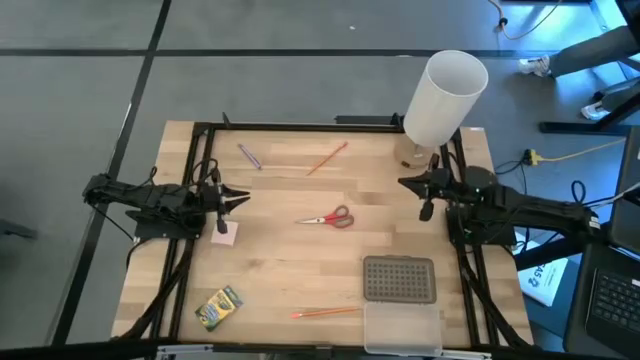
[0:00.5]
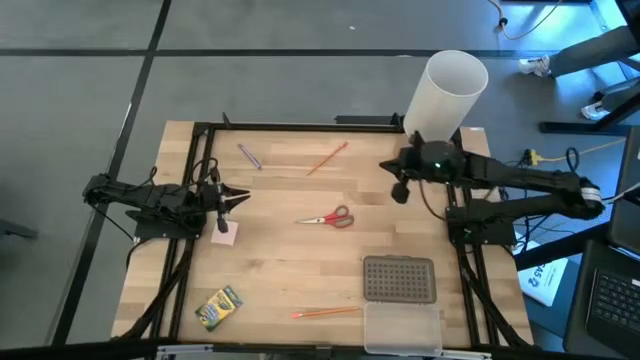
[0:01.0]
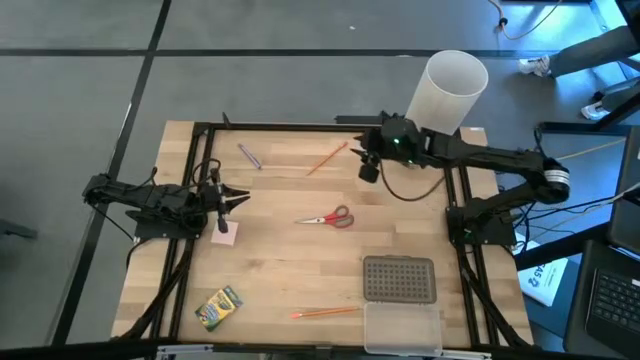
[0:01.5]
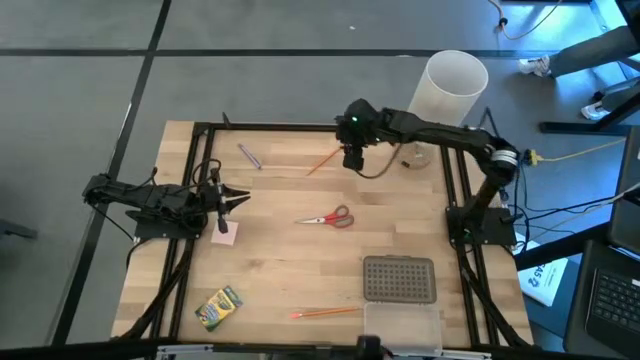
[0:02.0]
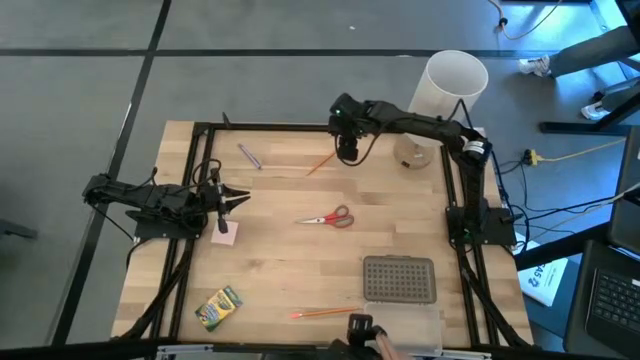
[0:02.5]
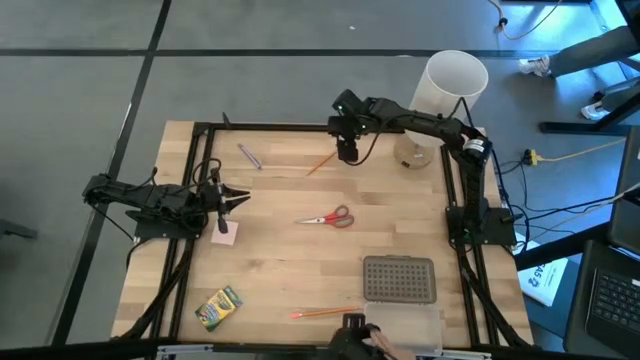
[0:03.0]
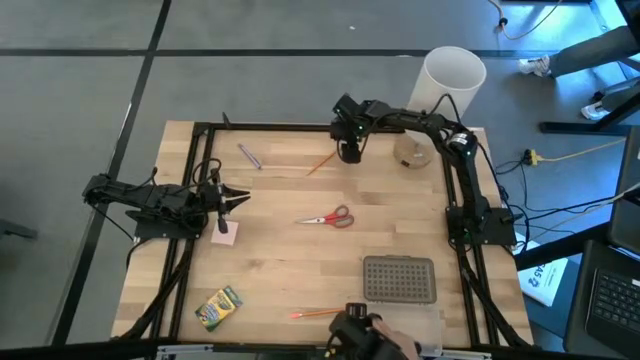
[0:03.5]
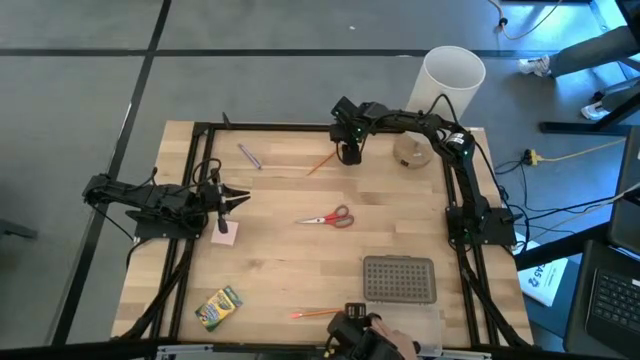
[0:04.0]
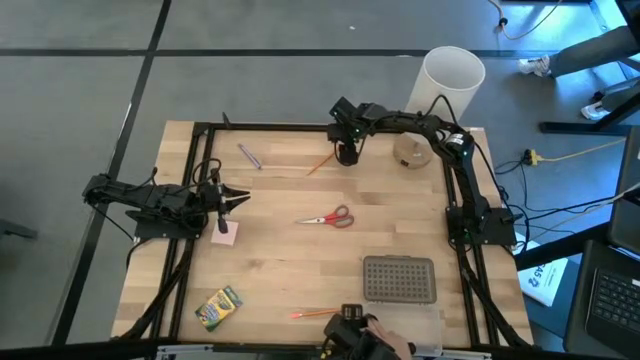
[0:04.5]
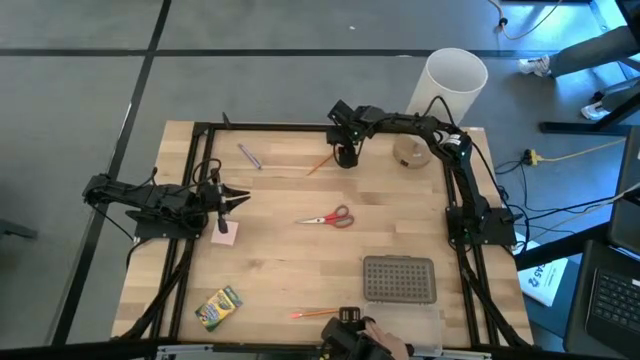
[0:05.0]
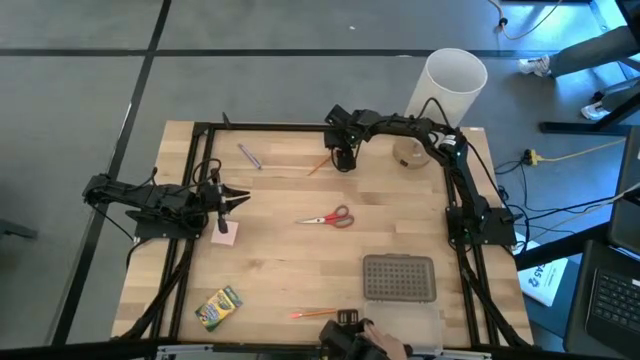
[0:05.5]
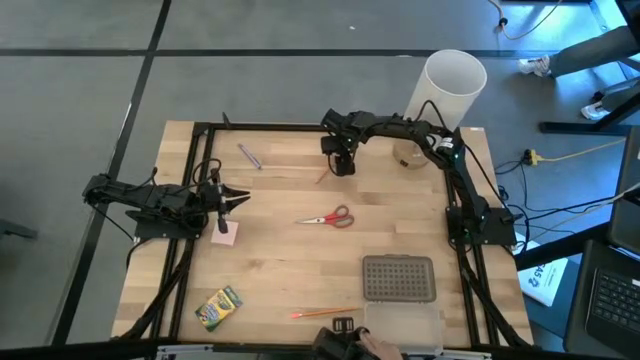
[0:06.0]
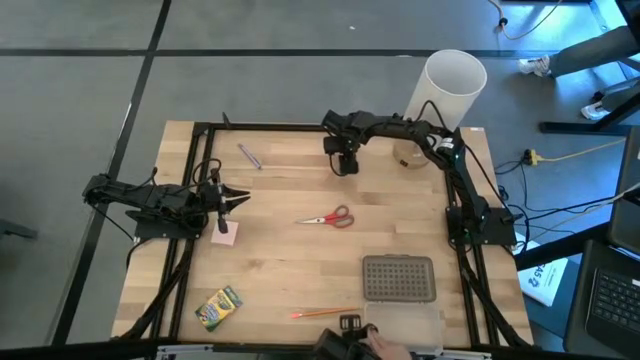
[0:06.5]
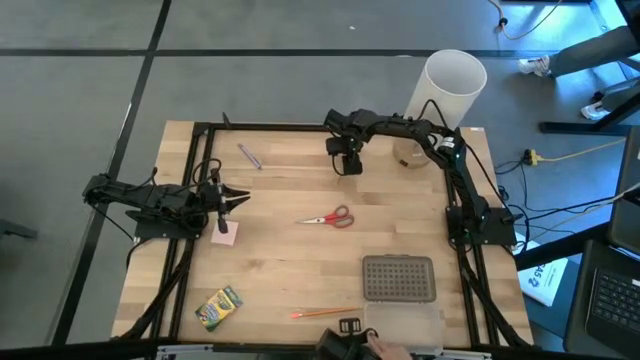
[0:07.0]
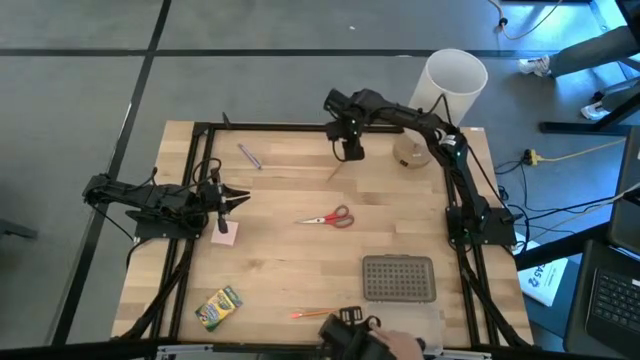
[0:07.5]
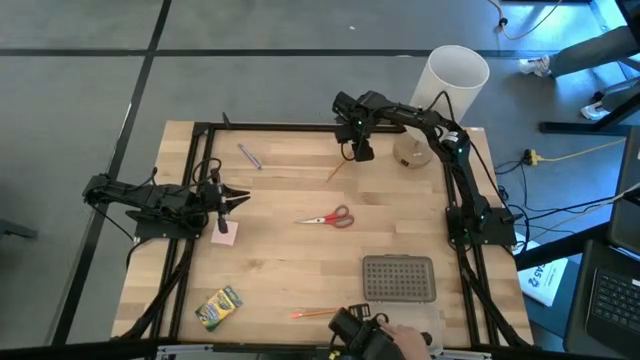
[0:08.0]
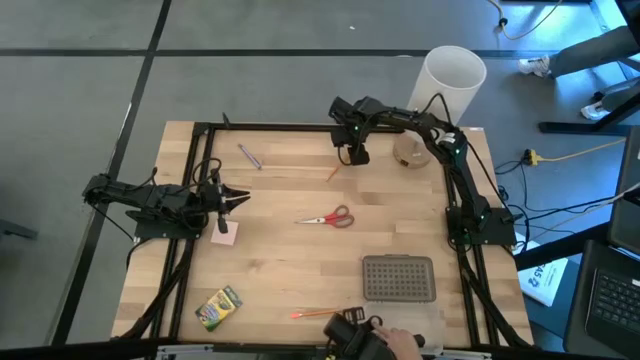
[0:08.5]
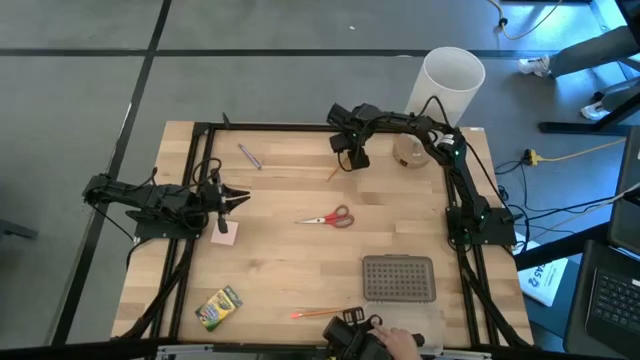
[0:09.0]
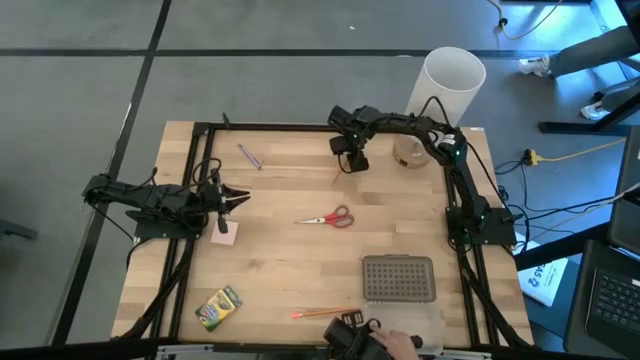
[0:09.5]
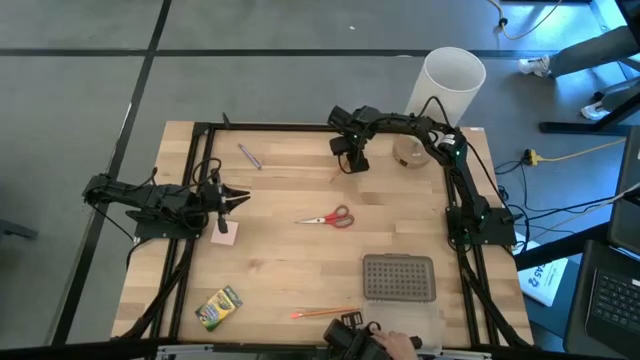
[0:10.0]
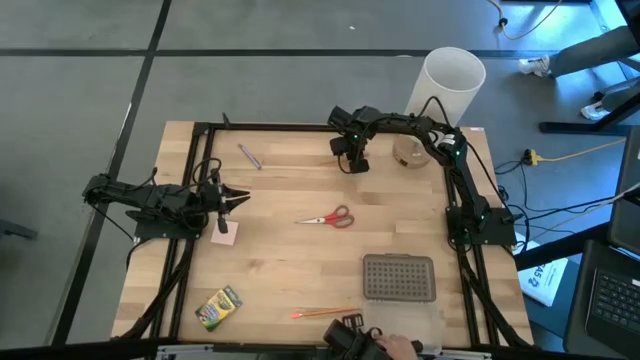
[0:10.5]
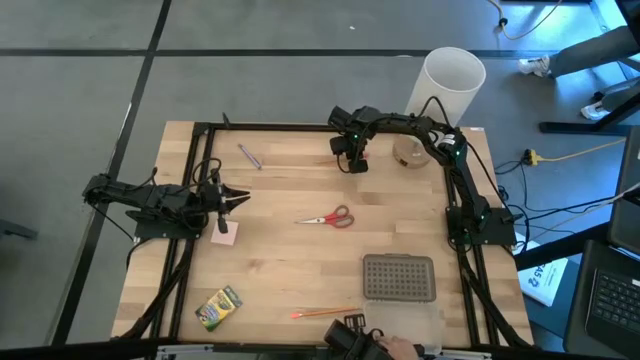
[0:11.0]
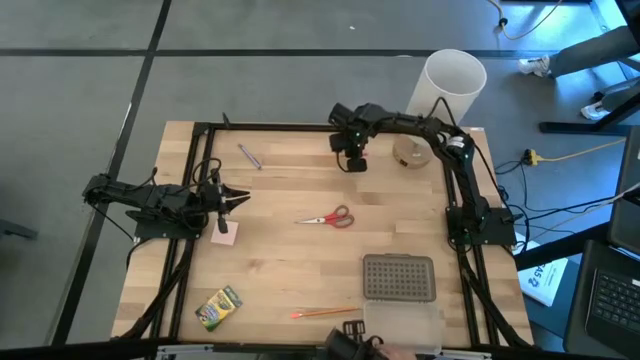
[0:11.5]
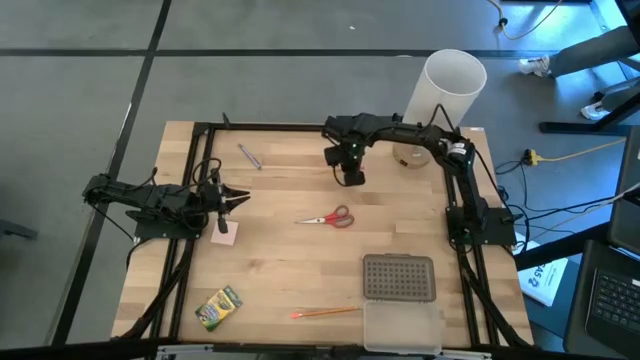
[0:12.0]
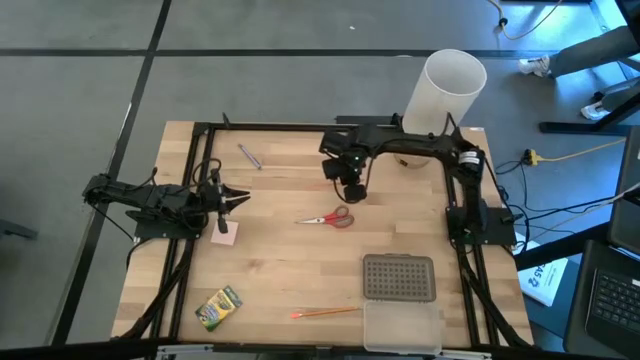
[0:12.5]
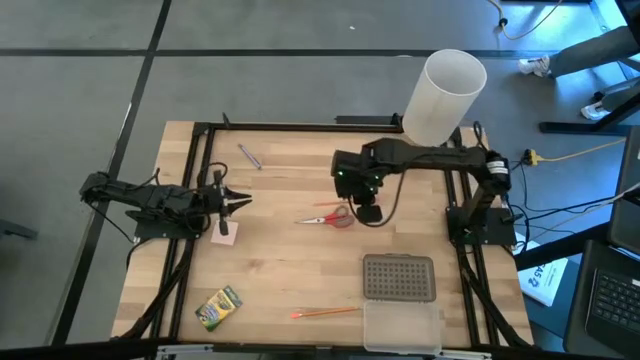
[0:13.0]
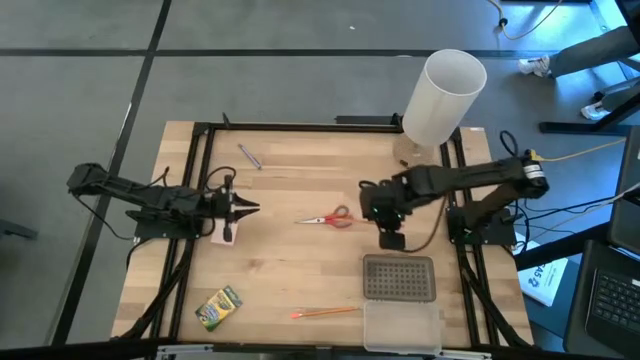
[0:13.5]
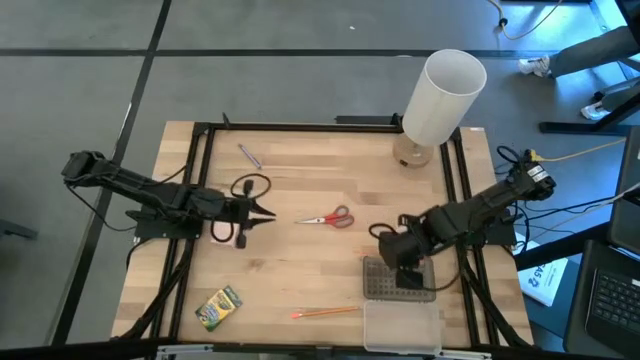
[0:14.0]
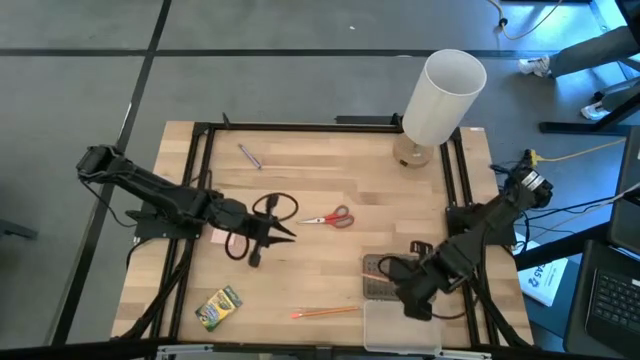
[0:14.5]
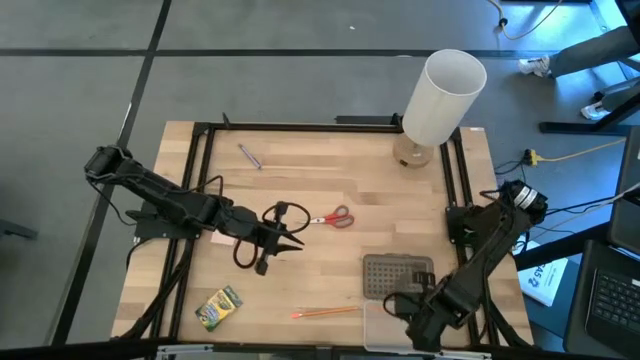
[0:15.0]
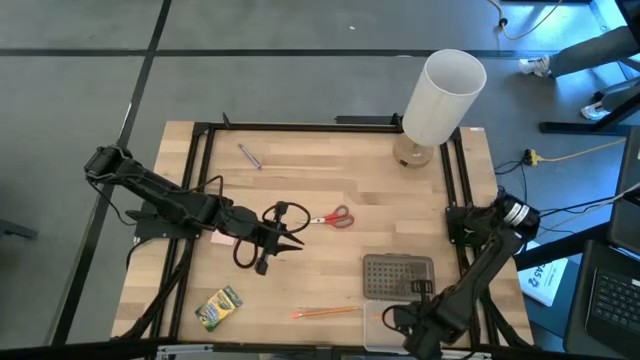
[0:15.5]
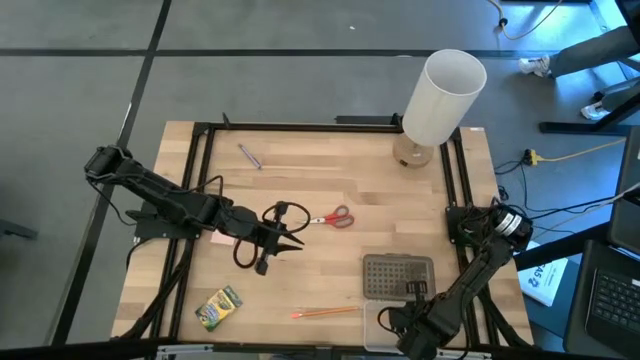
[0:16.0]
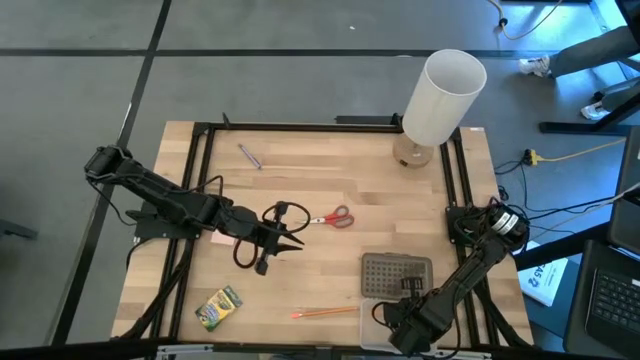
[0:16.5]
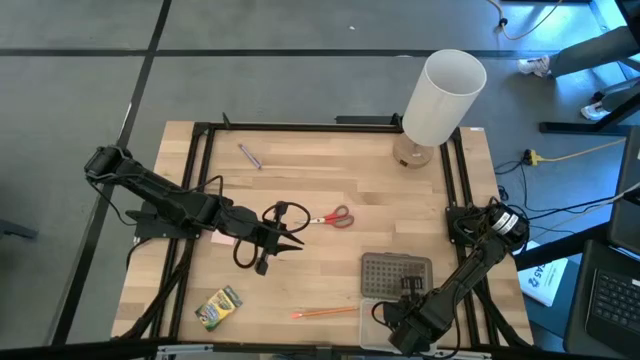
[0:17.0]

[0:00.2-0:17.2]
Task: Pack school essentials
Put the top orange pencil into the supply box
